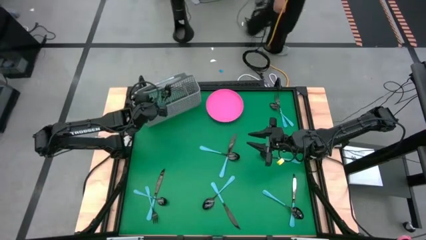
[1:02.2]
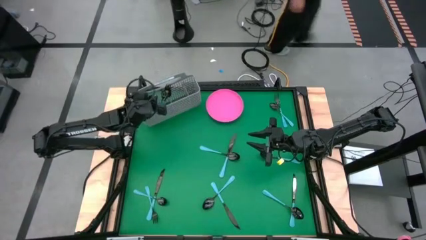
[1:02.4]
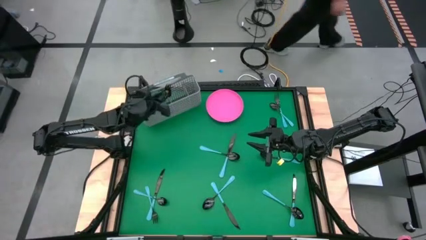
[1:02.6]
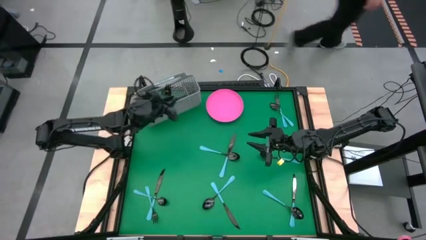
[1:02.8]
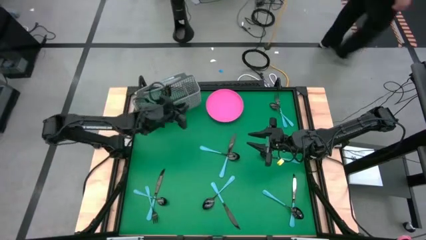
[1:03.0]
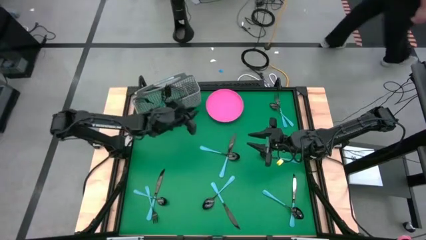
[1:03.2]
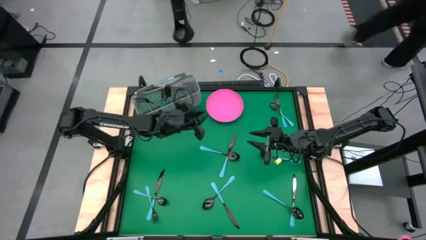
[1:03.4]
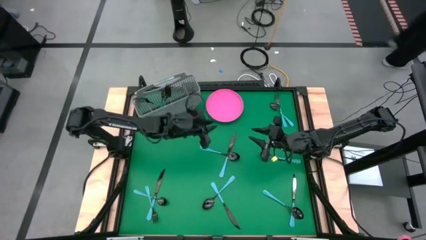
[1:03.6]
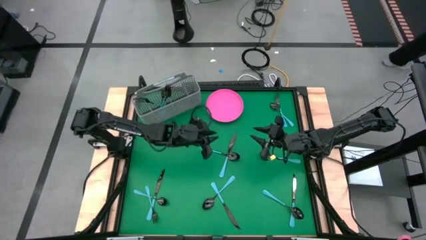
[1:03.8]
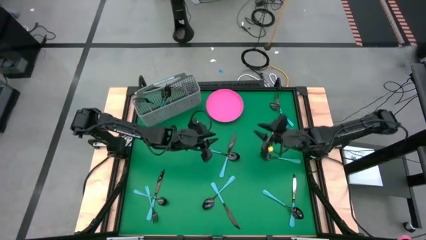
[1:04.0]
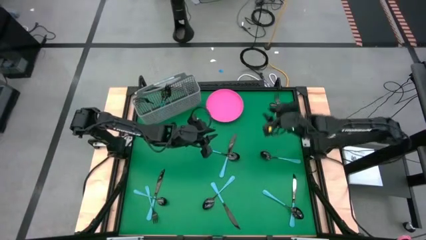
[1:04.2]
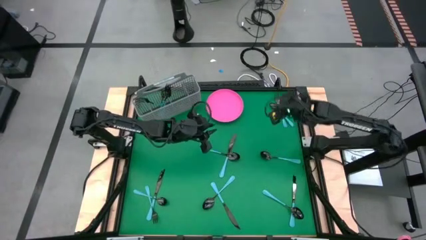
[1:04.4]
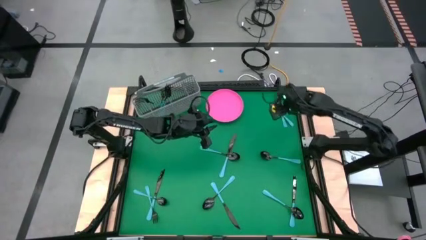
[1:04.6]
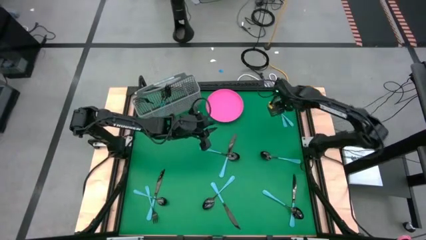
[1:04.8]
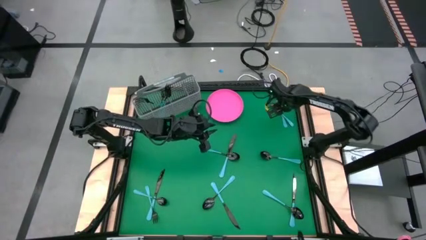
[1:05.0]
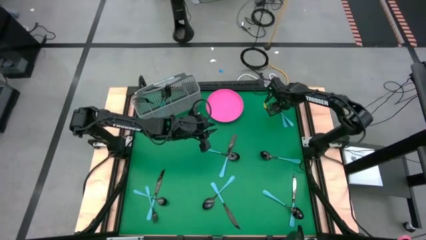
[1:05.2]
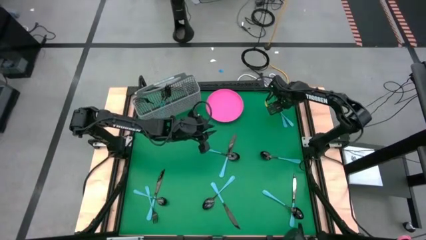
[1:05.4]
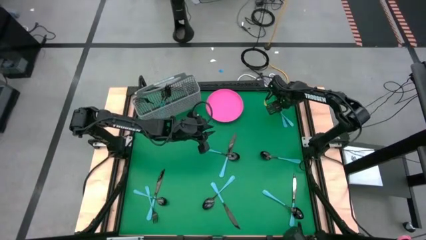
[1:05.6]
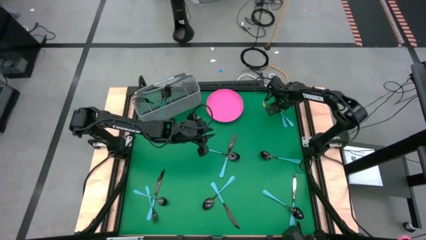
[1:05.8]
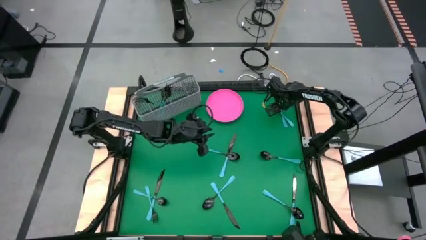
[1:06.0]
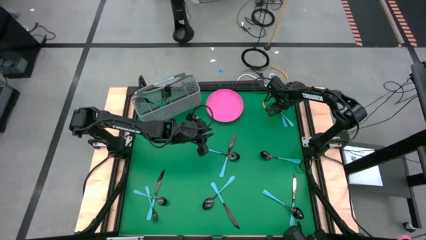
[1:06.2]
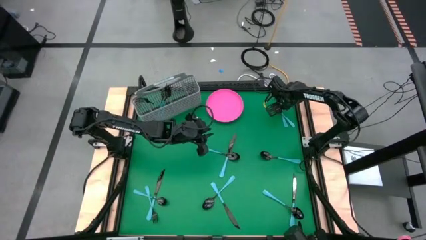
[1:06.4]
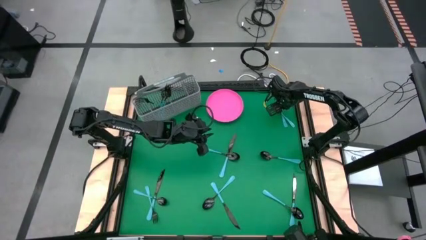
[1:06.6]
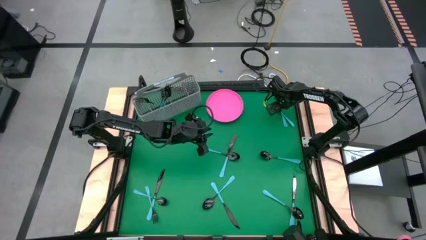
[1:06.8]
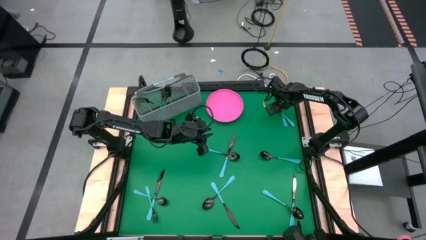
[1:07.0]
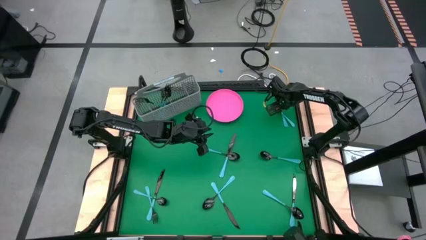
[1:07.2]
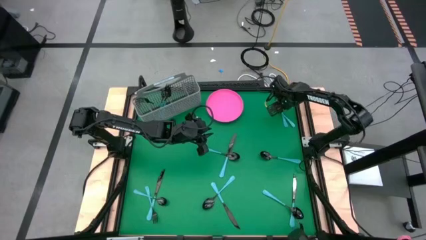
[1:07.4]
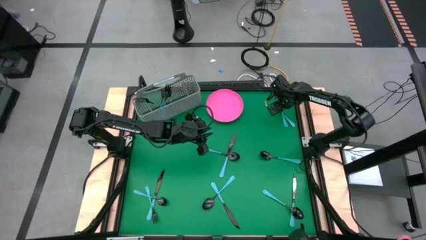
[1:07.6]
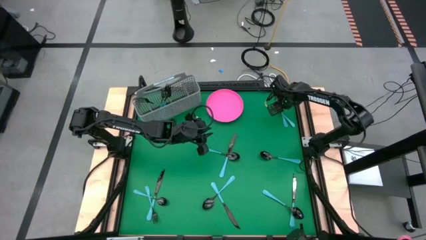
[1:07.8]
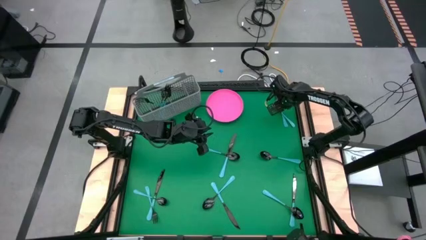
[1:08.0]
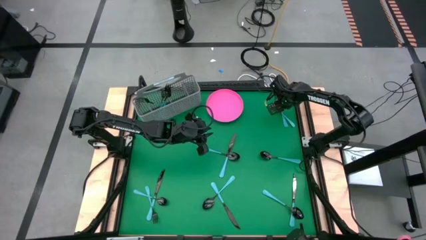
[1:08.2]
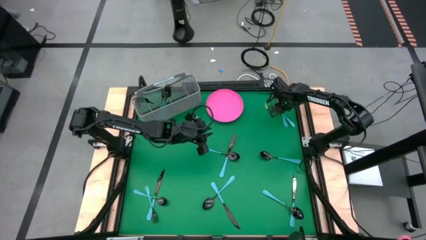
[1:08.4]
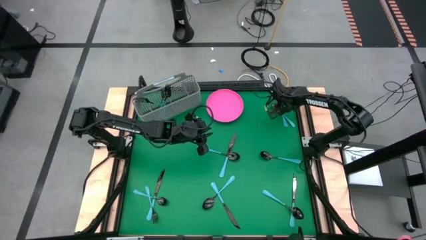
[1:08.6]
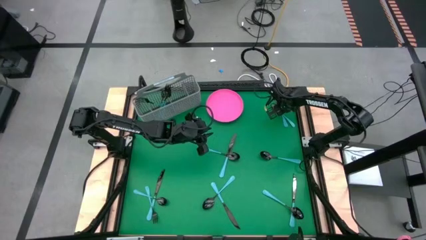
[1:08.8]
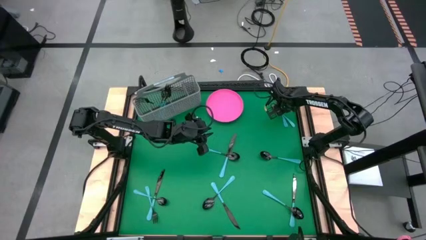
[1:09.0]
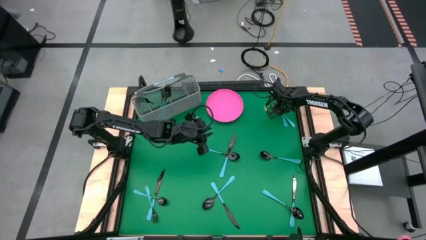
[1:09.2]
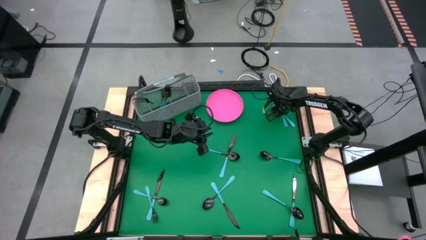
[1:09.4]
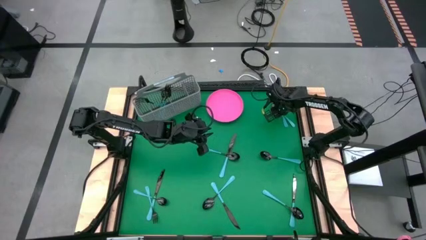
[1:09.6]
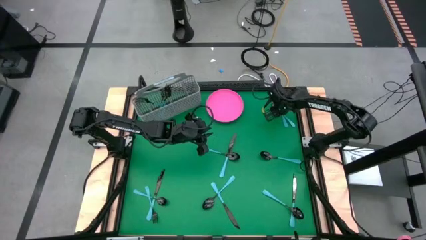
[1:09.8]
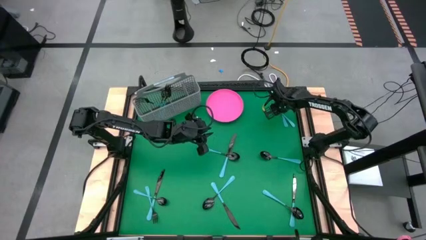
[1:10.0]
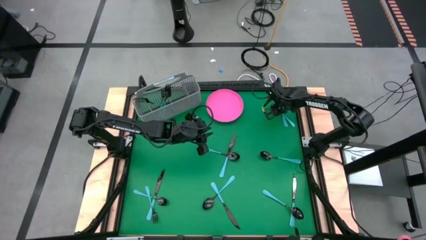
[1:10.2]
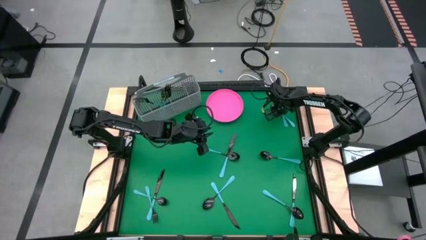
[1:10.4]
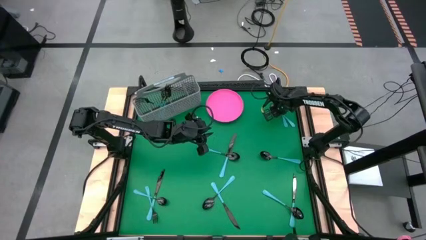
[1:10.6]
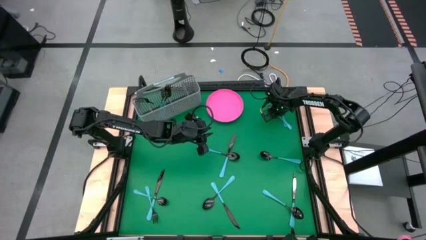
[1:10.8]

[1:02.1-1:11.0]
Task: Sort silverware
Adjust the blue spoon on the table

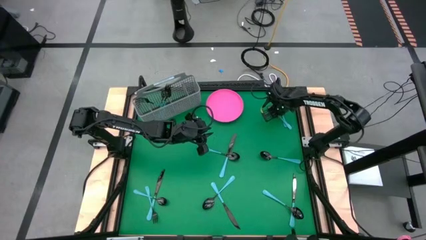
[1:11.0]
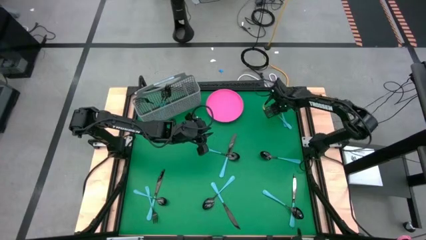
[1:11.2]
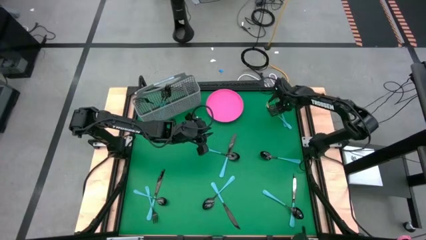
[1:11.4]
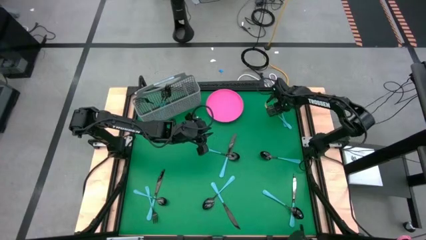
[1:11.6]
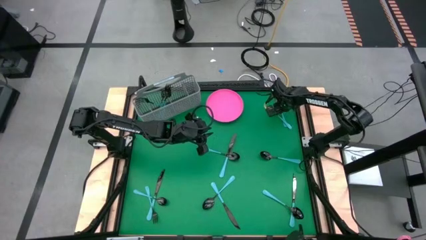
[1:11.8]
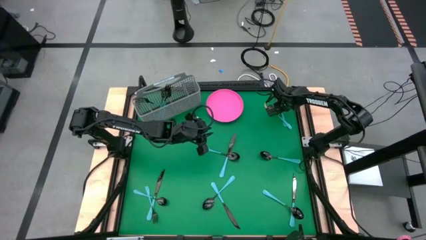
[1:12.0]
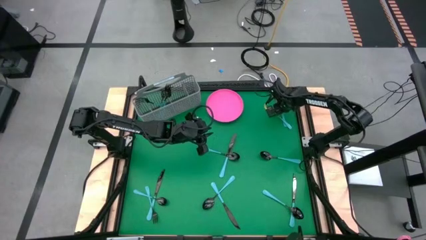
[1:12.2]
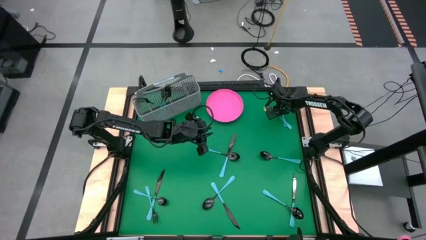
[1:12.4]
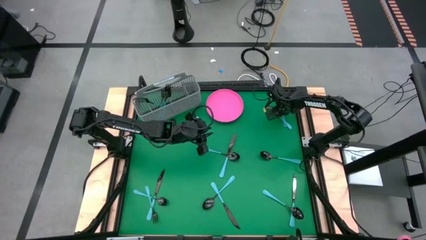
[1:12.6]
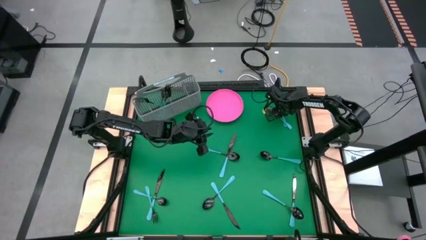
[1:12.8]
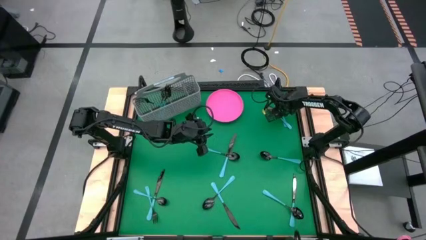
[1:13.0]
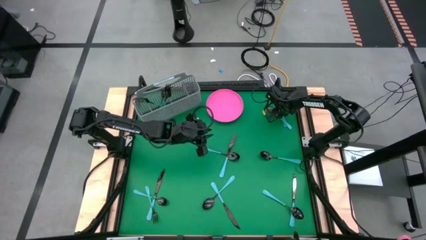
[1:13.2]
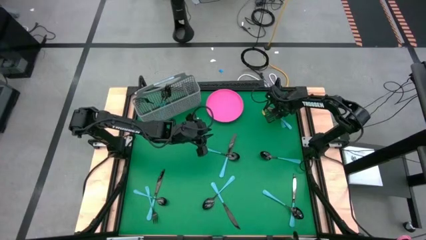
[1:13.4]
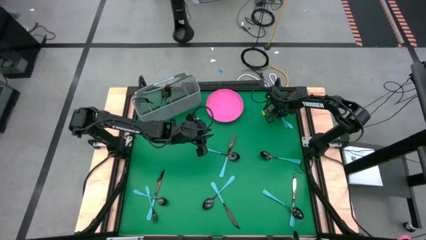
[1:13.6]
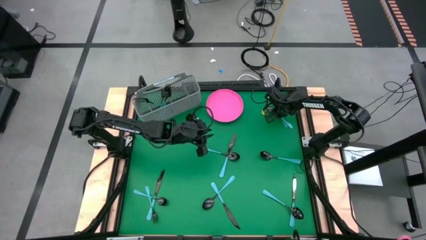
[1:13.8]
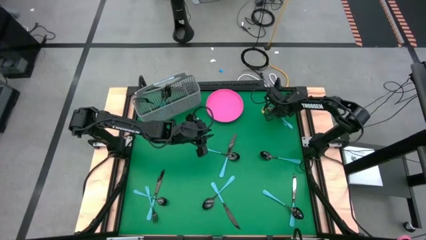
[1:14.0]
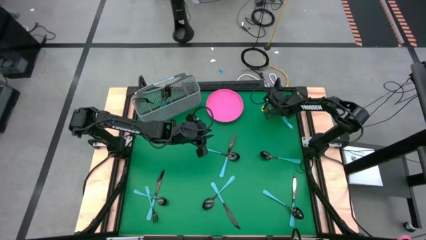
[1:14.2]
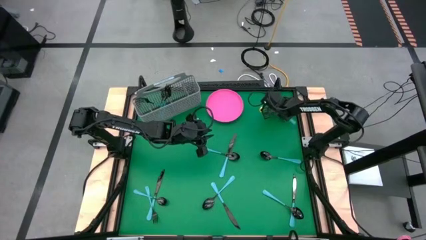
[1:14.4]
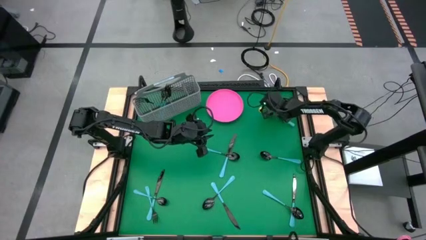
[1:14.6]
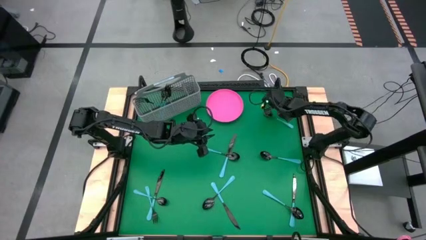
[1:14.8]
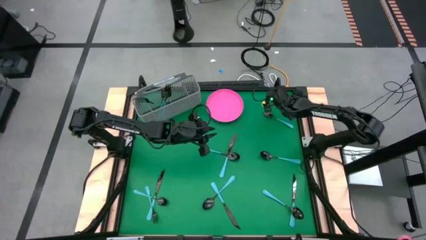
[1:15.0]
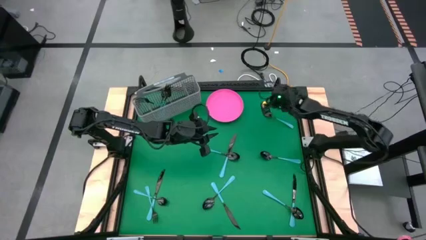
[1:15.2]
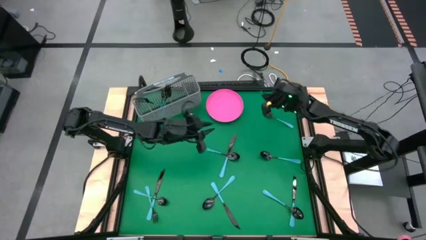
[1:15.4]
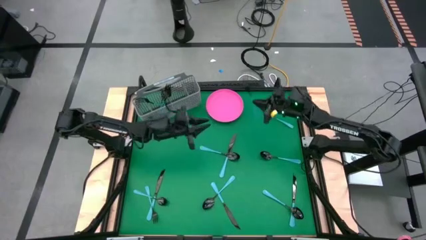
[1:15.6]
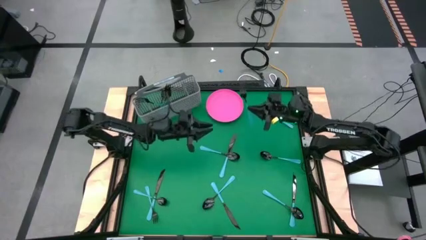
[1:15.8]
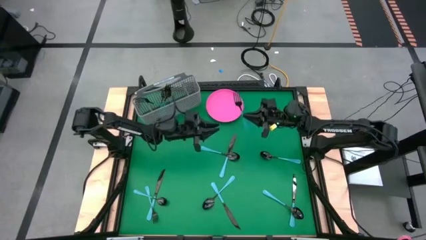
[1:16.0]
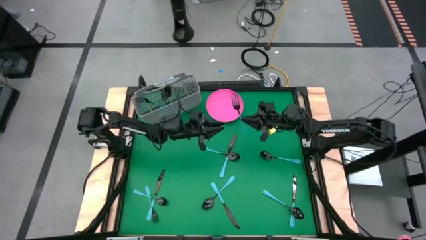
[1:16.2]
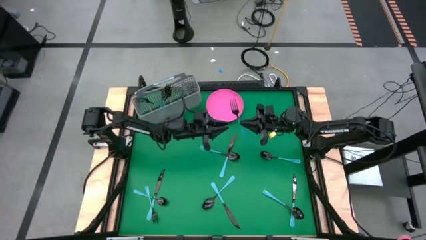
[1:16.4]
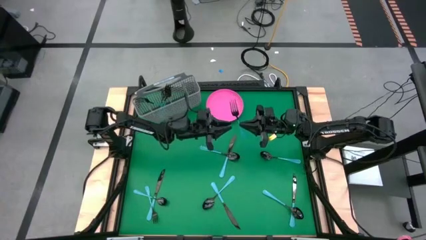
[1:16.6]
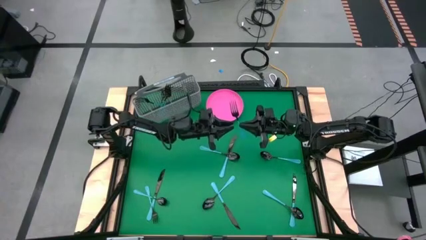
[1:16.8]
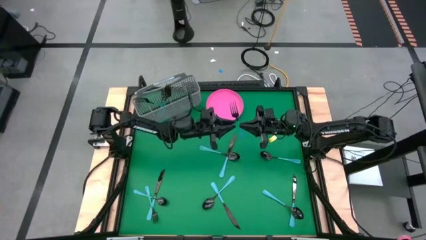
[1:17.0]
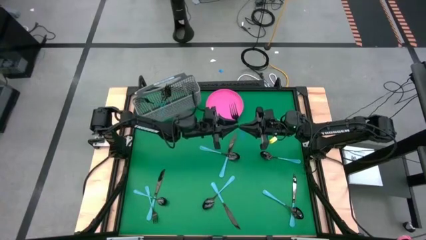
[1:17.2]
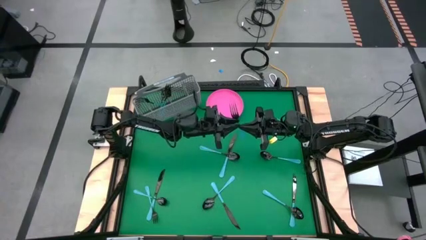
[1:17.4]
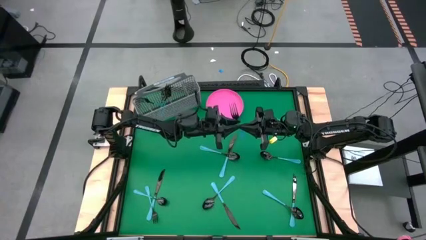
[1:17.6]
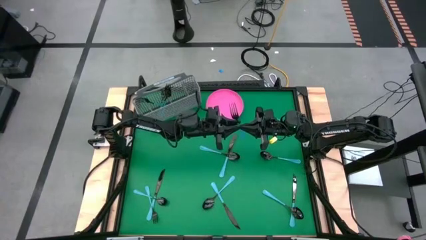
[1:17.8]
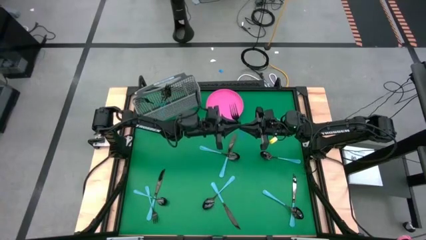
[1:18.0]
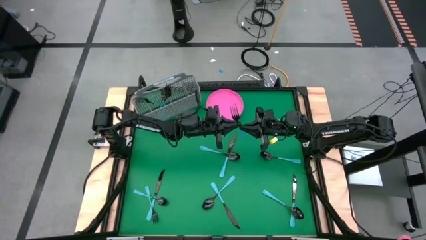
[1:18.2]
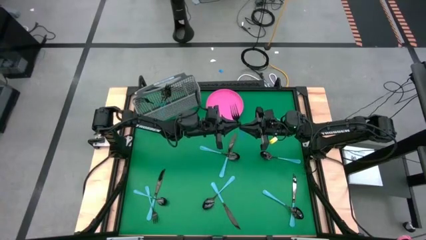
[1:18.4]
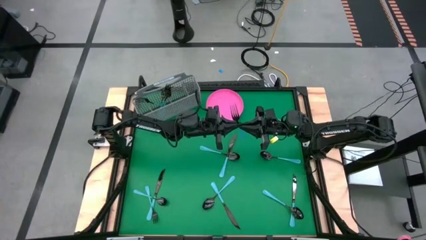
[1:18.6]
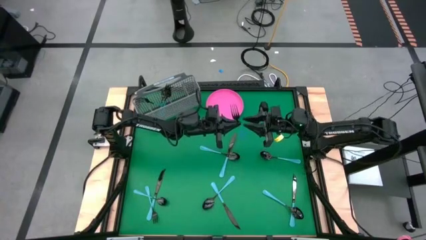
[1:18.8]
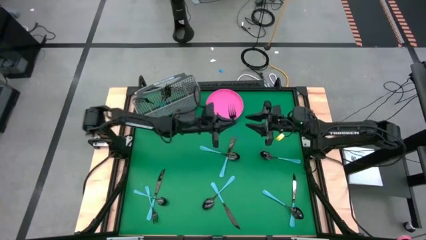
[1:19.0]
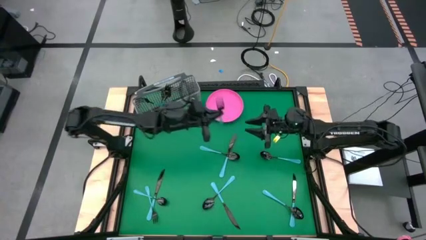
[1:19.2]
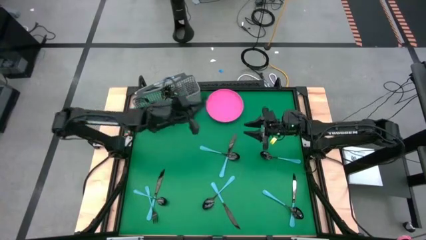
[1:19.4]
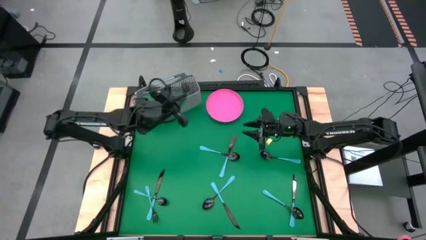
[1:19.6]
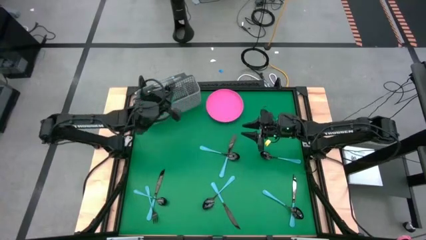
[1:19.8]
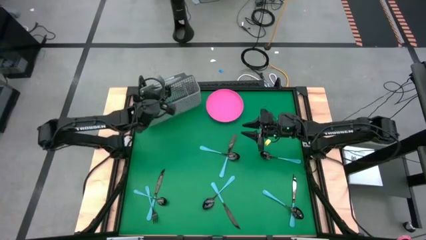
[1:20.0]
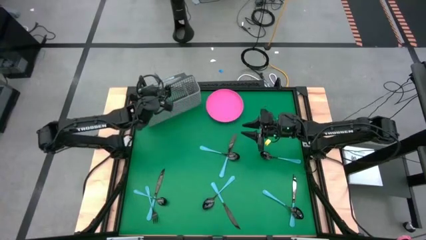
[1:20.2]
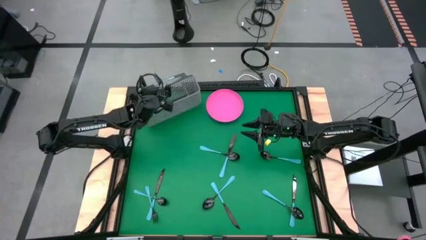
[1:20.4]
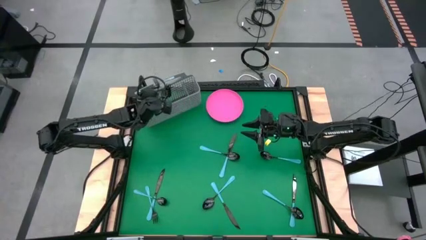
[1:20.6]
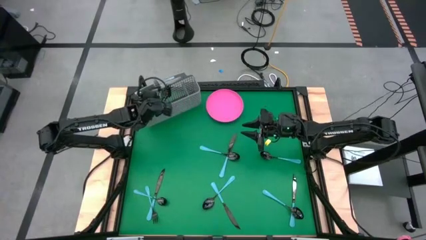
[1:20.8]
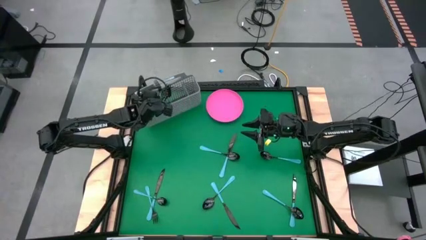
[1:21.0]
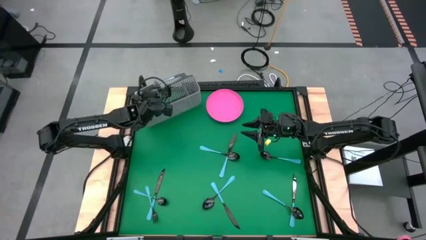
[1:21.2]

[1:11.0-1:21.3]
Put the blue fork into the gray silverware holder
